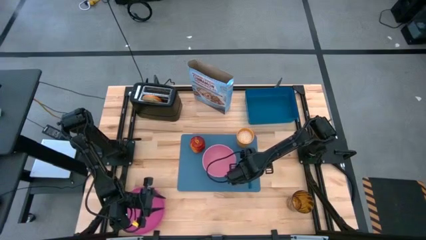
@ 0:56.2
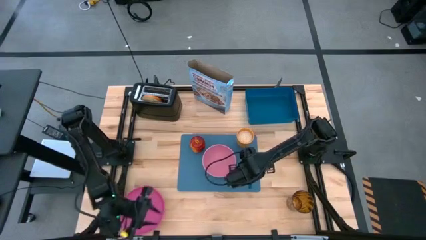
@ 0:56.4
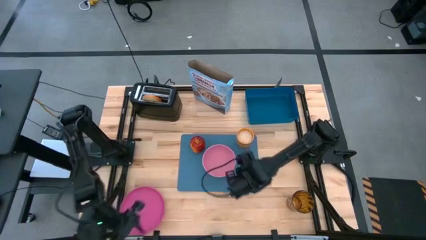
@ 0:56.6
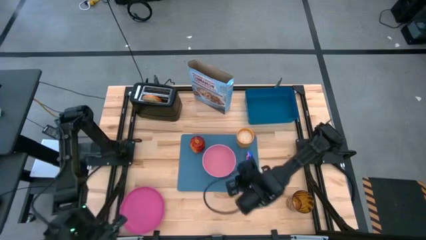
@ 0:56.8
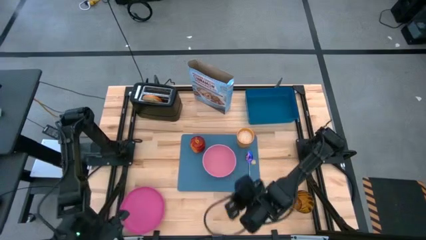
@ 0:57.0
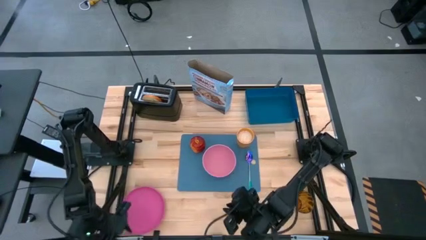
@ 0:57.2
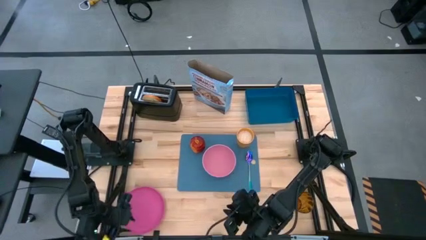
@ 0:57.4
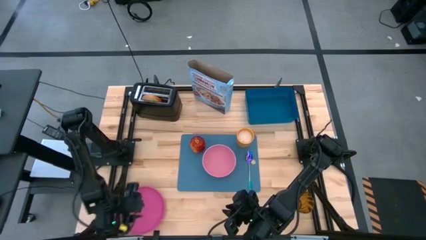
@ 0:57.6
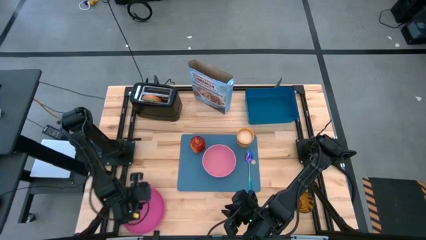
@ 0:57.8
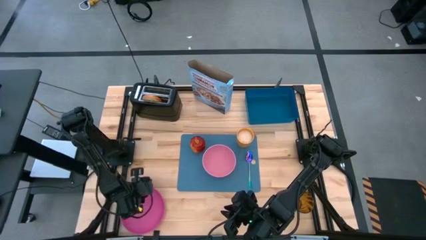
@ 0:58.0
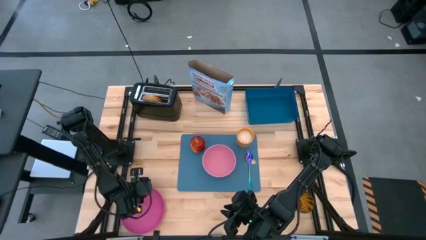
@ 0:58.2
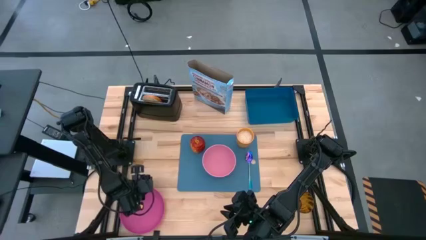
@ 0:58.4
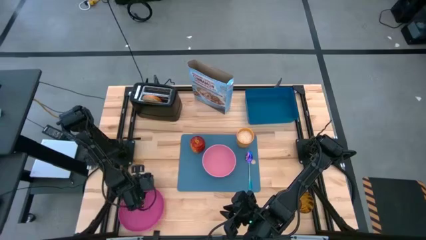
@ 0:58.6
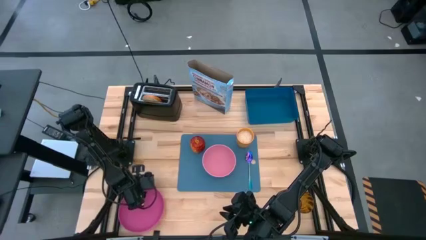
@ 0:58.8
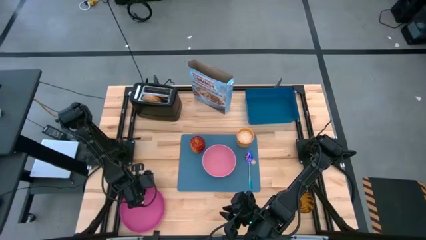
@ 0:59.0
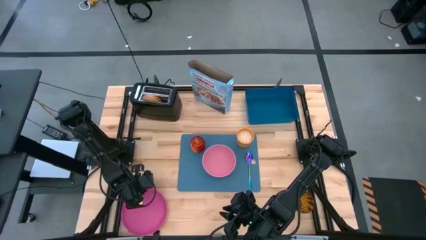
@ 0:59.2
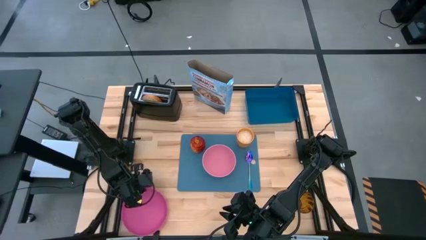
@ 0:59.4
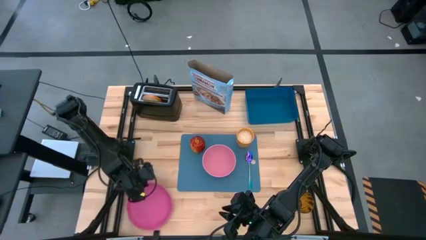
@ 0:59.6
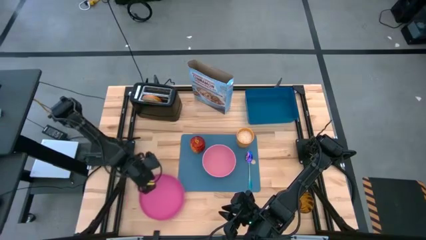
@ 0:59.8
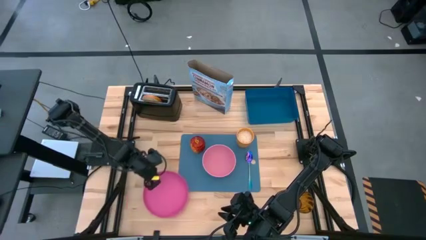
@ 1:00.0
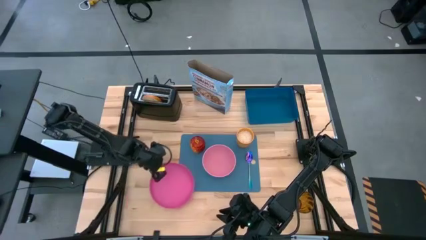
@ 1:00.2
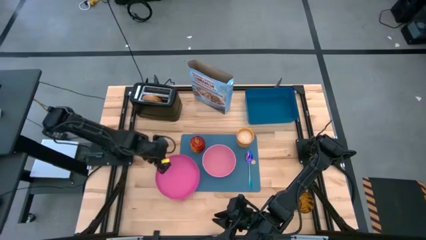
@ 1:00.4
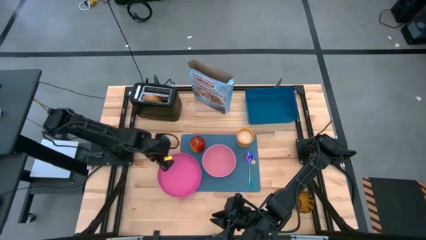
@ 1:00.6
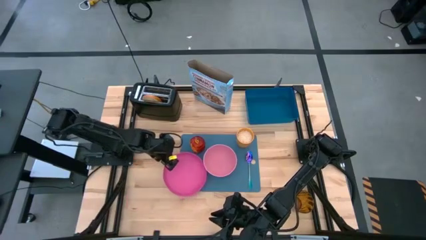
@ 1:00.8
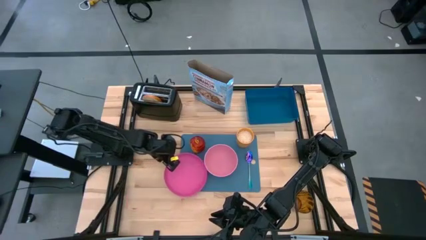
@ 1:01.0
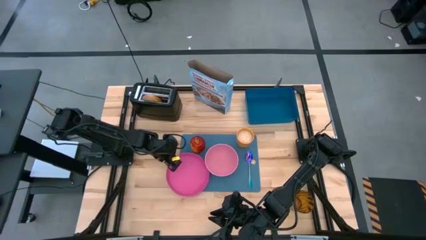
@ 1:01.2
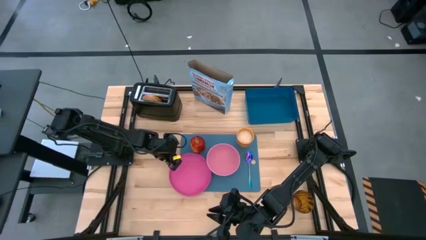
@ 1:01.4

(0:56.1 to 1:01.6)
Task: Arrange a breakfast setting
Put the pink plate on the blue cutting board to the left of the pink bowl

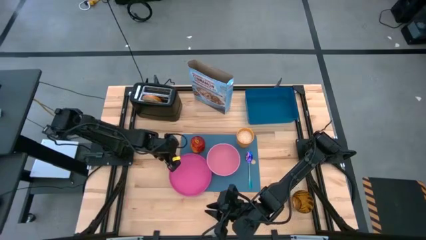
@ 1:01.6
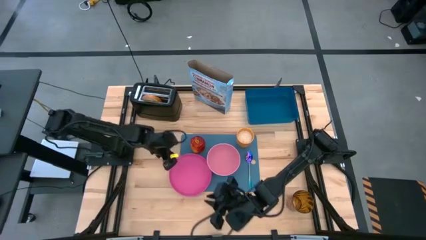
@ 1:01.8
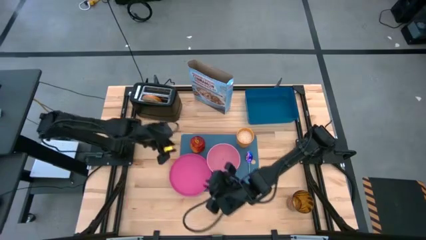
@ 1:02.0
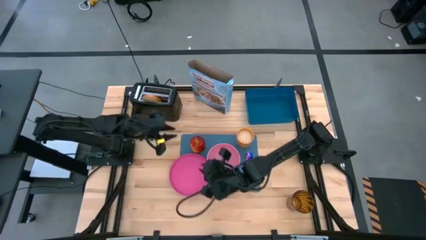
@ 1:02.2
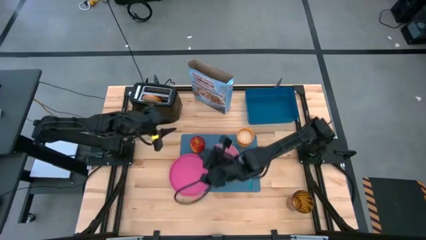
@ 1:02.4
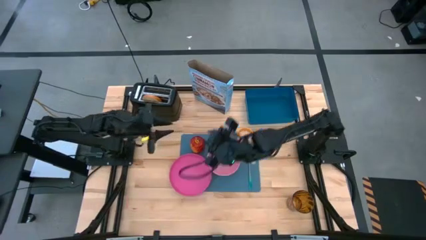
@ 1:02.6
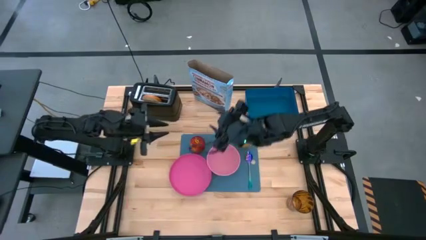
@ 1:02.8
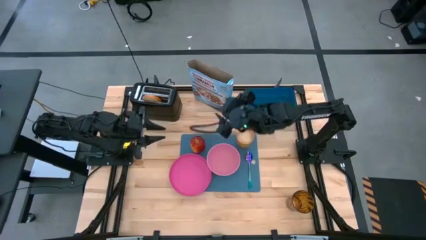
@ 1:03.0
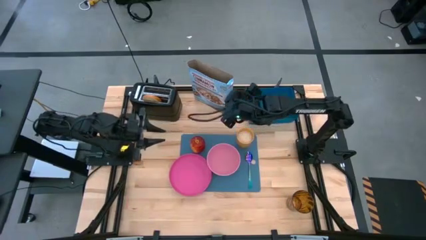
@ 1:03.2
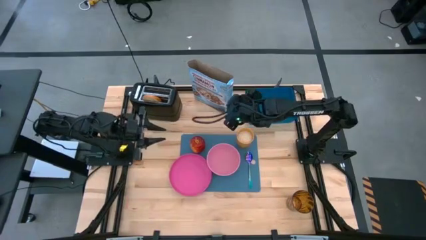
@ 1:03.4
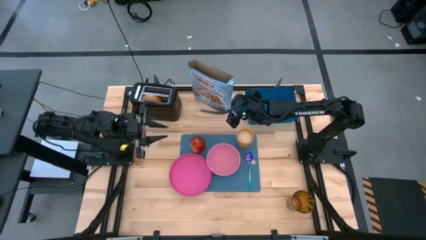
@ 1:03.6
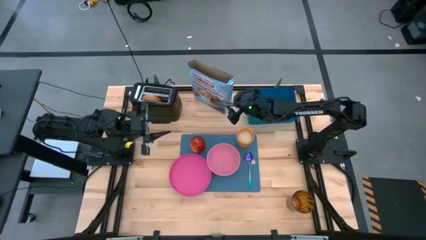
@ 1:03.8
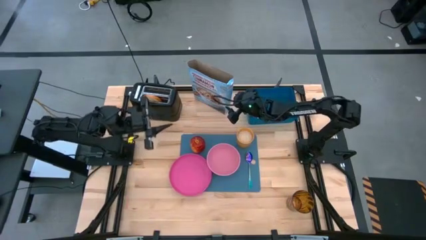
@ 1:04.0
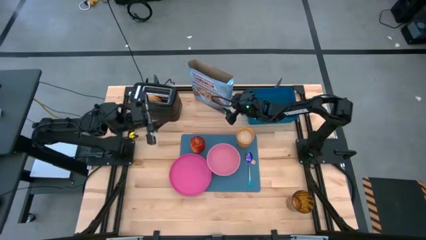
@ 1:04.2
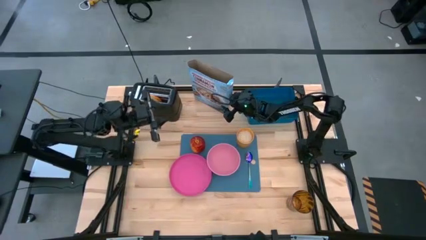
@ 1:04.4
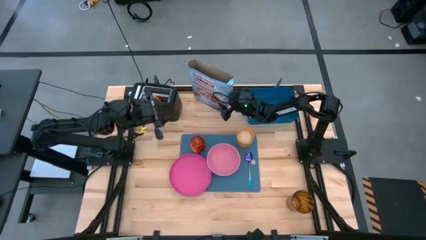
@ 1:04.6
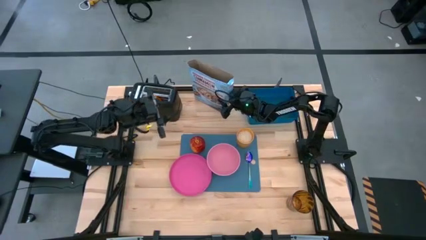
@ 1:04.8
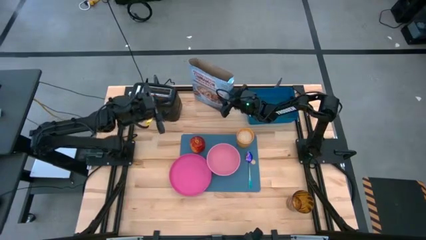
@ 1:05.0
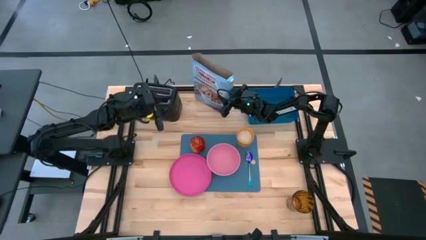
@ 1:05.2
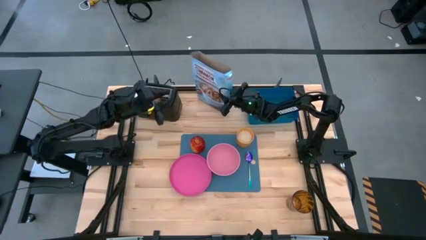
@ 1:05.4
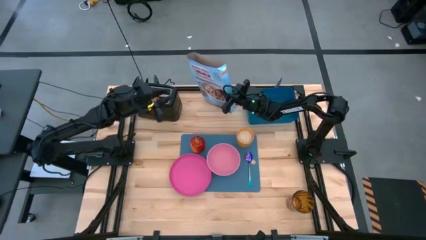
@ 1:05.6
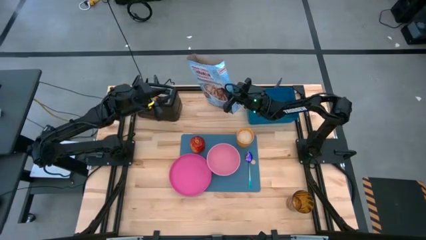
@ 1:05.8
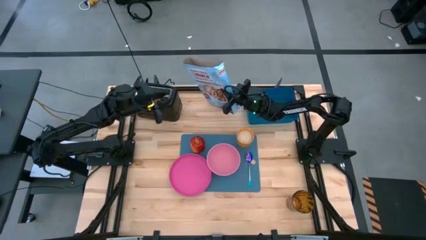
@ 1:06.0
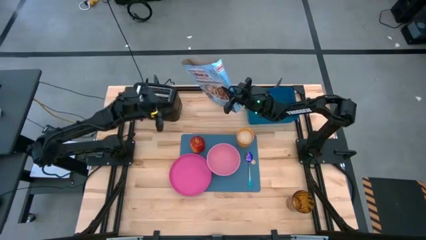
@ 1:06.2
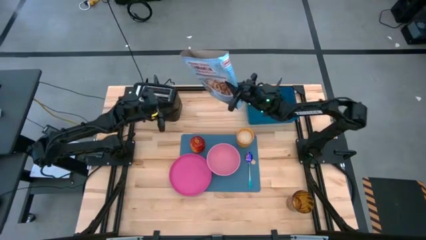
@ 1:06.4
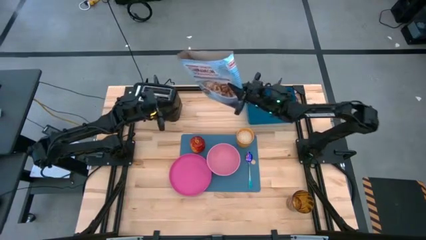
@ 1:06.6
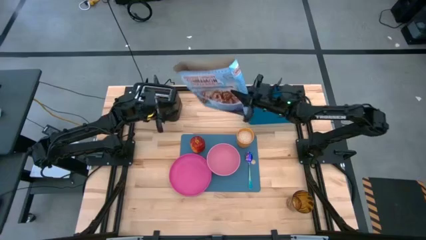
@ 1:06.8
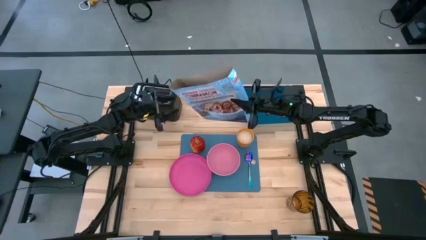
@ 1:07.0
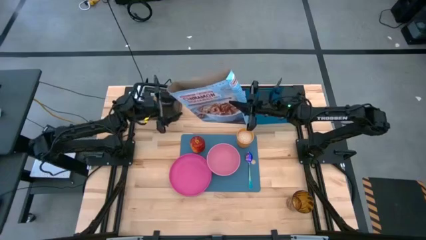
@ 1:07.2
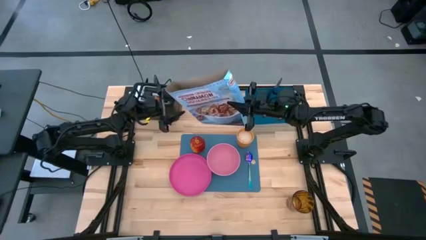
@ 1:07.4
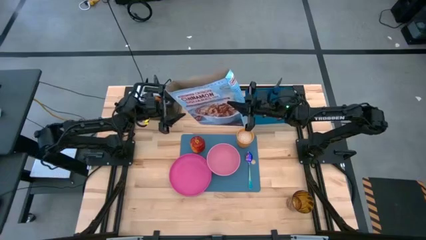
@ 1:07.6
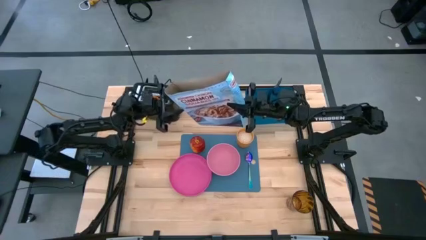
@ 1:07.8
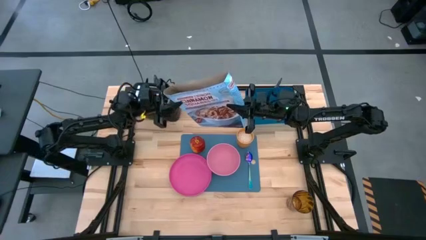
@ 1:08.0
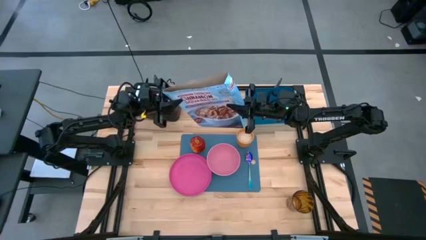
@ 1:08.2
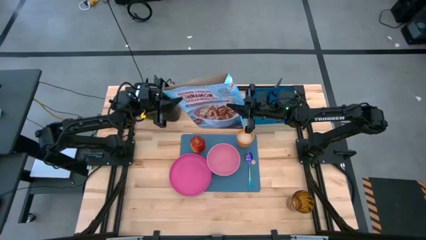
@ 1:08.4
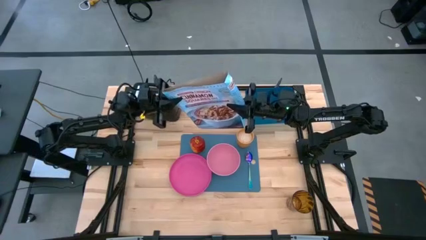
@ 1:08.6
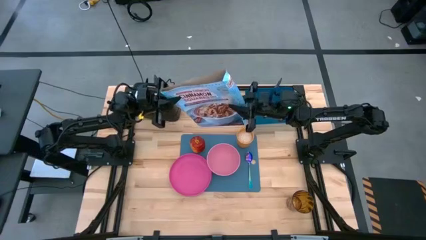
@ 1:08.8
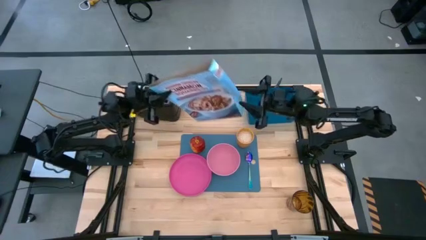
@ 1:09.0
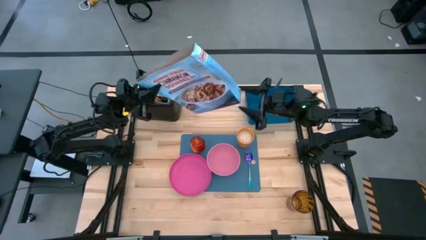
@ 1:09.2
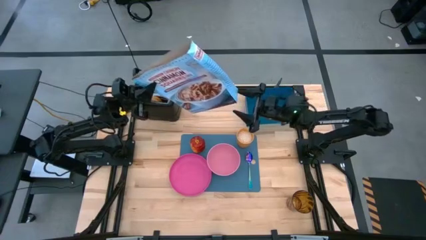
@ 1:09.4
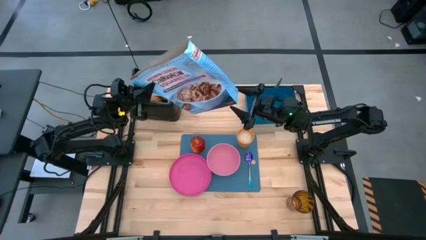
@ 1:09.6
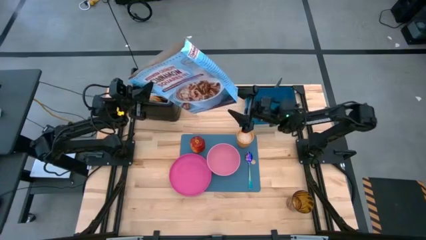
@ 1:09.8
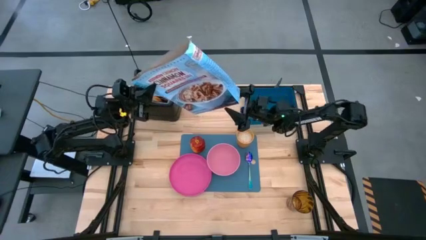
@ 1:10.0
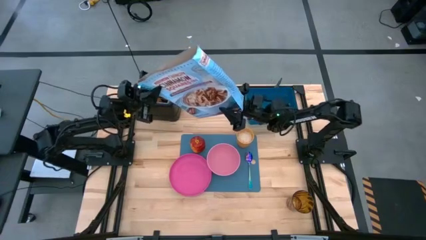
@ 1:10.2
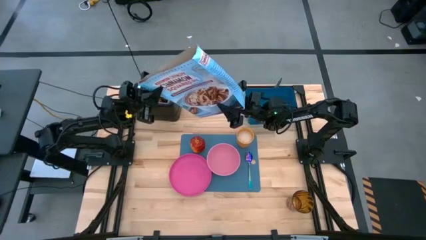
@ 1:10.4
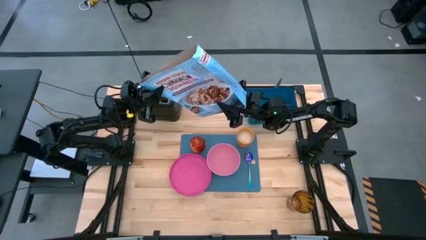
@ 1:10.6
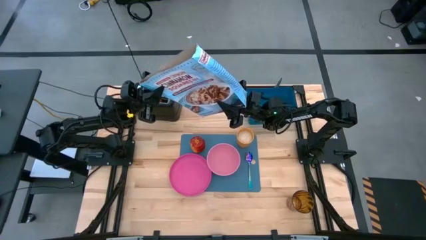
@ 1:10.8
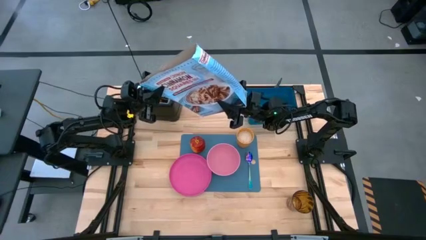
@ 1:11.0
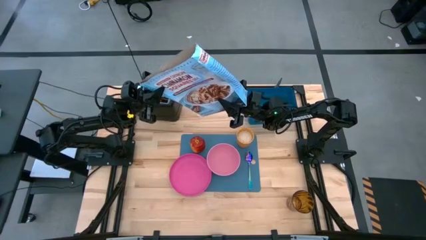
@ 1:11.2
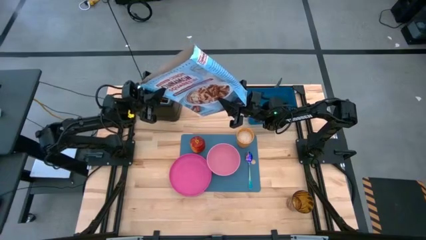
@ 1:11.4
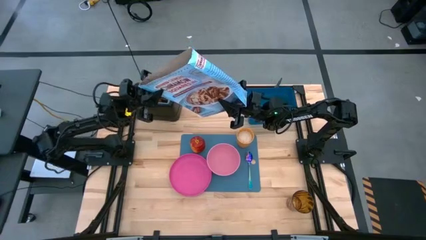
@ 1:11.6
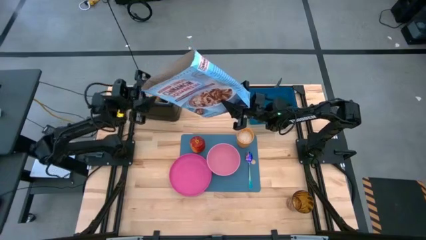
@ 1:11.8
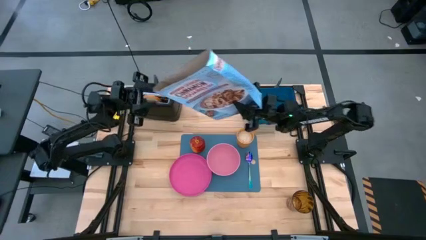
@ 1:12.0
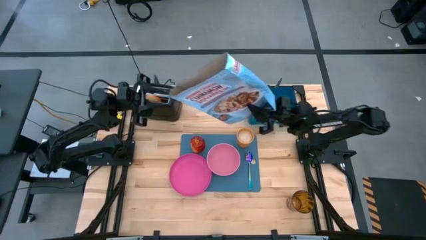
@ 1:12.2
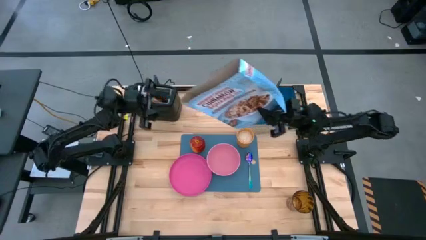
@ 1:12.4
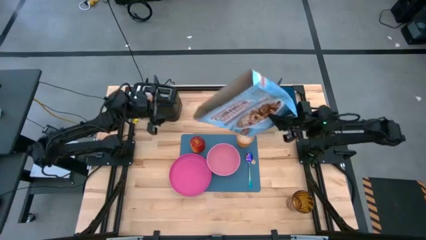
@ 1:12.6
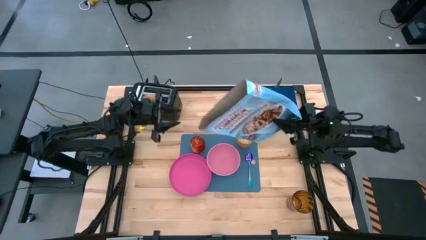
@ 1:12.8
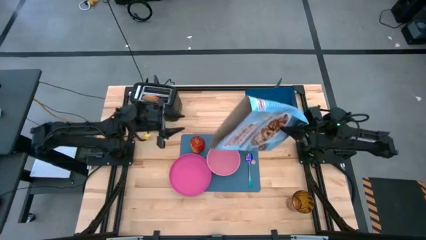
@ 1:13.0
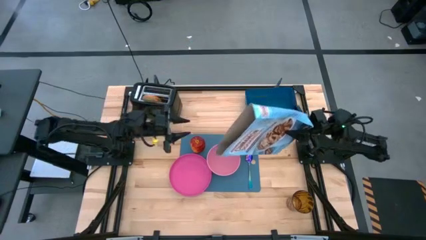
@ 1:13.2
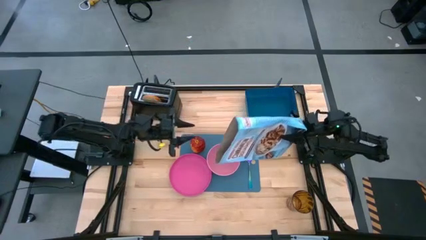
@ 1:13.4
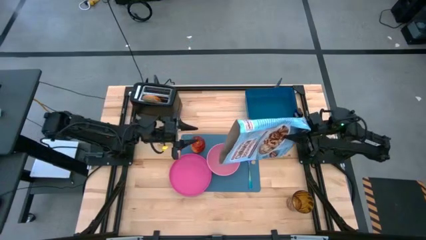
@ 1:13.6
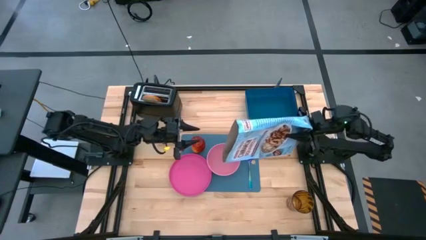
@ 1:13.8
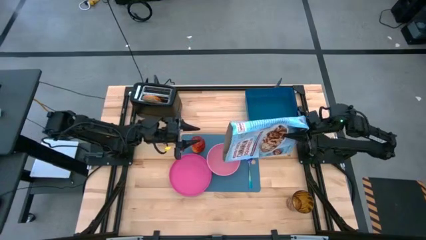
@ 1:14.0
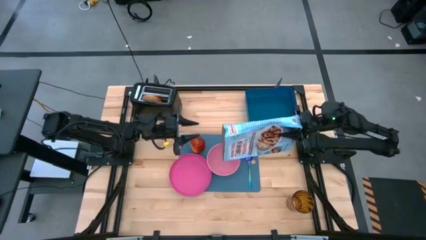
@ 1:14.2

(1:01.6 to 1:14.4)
Pour the cereal into the pink bowl
